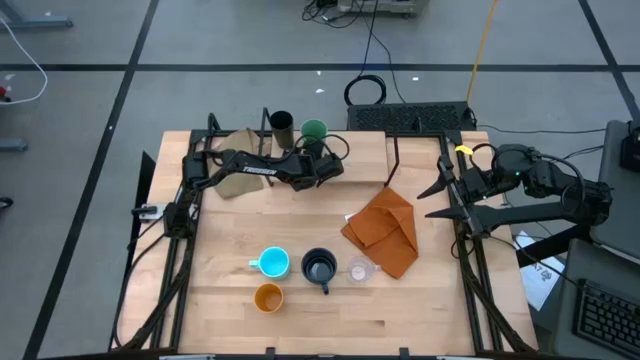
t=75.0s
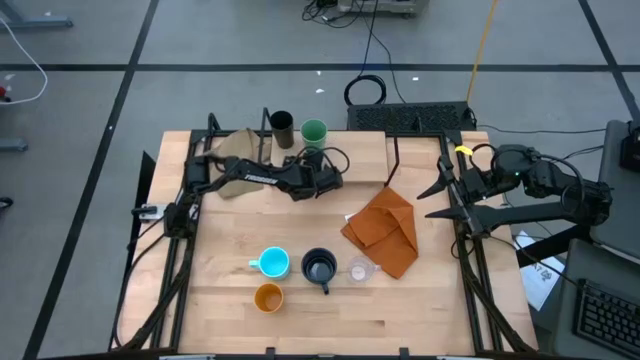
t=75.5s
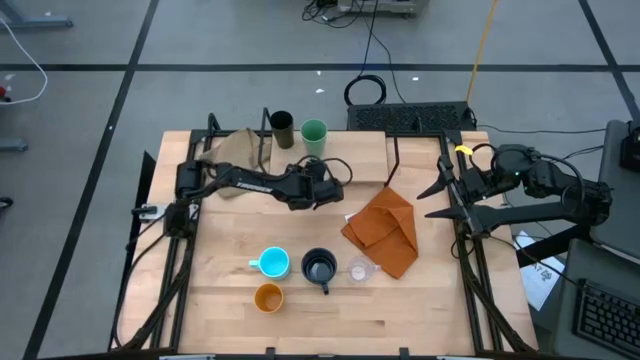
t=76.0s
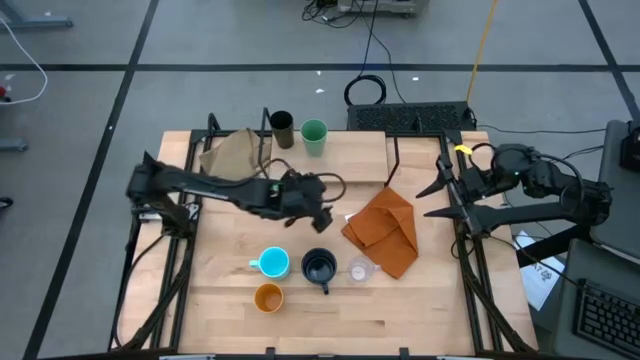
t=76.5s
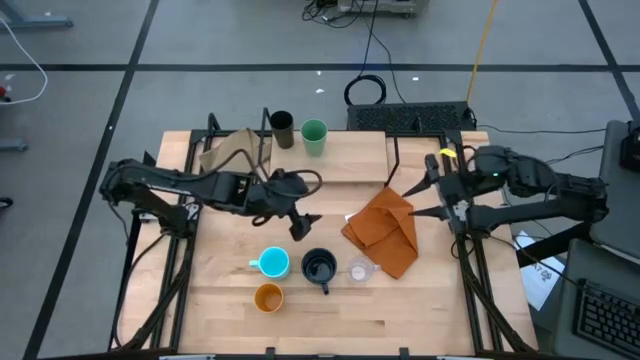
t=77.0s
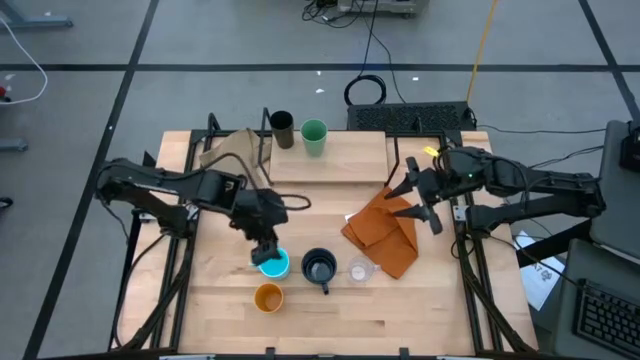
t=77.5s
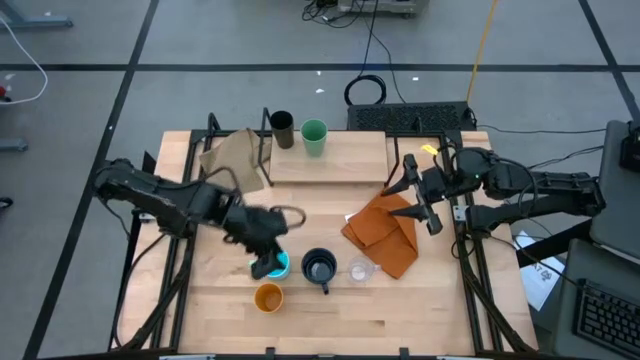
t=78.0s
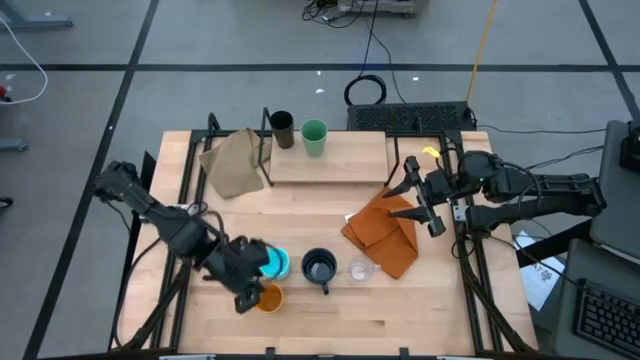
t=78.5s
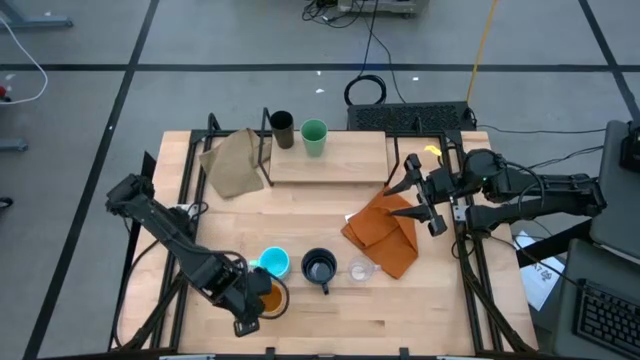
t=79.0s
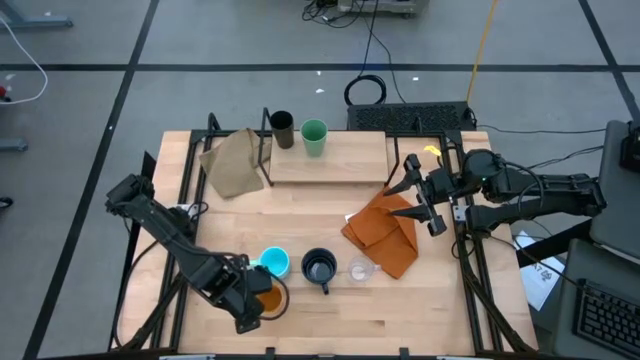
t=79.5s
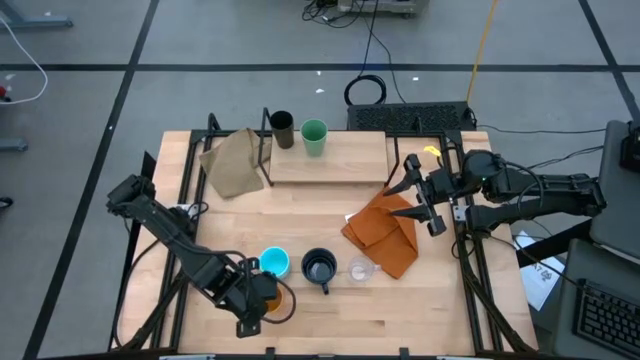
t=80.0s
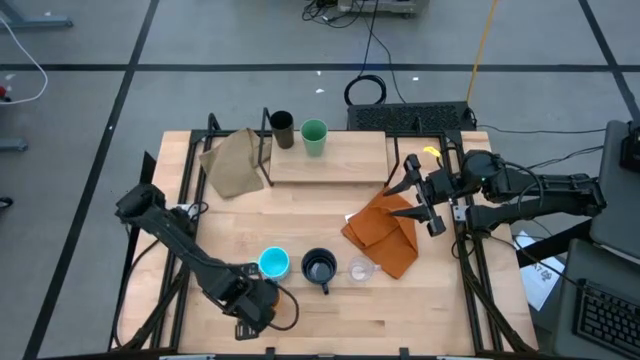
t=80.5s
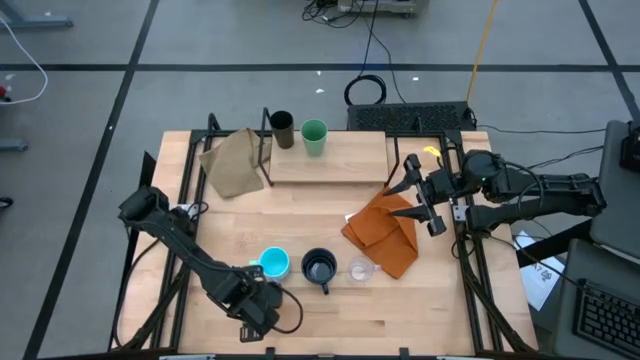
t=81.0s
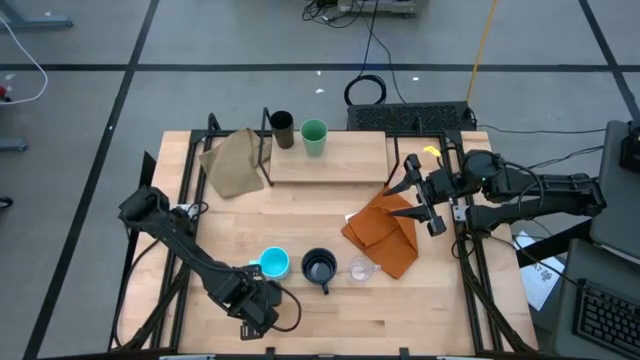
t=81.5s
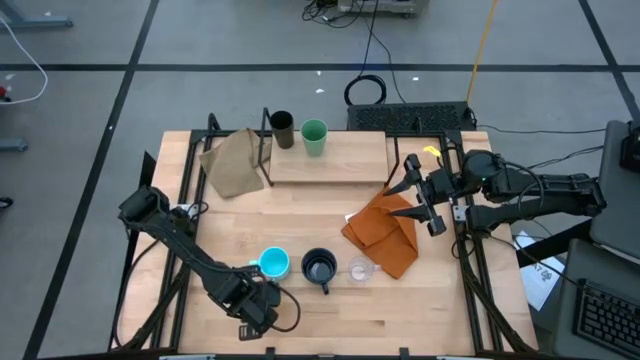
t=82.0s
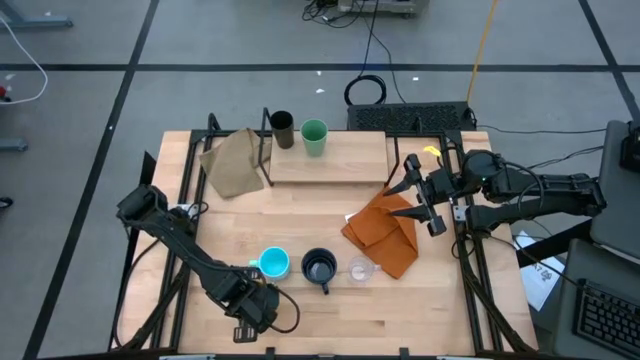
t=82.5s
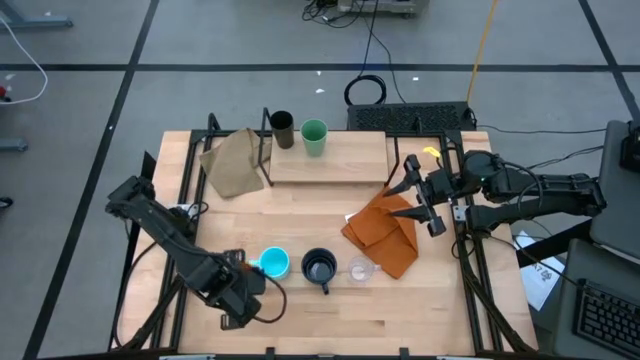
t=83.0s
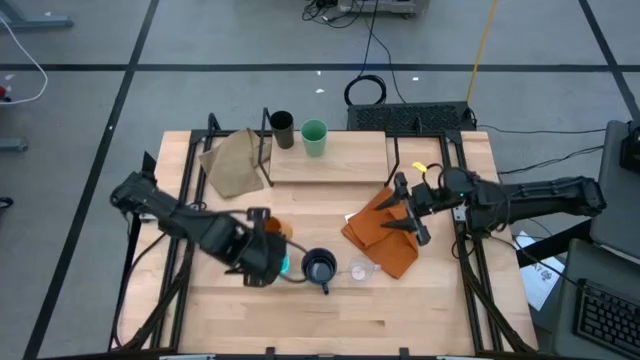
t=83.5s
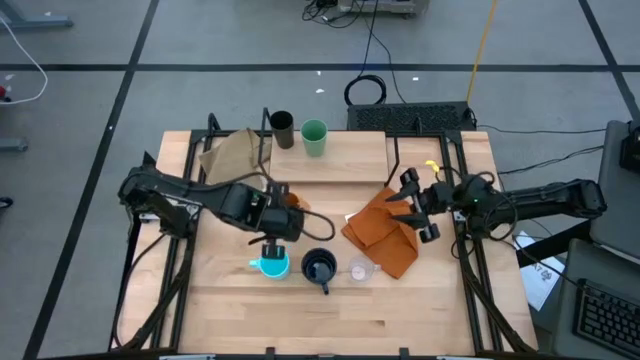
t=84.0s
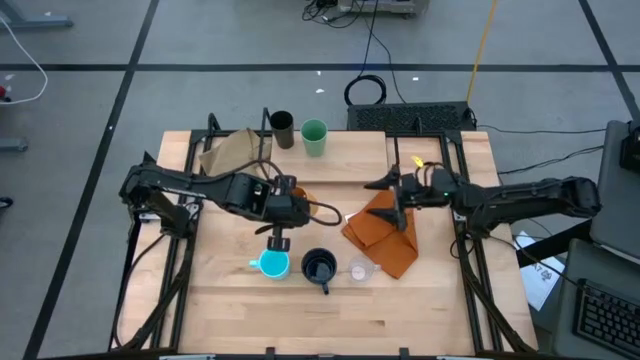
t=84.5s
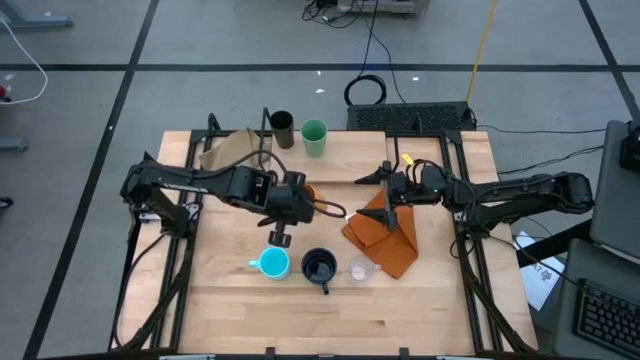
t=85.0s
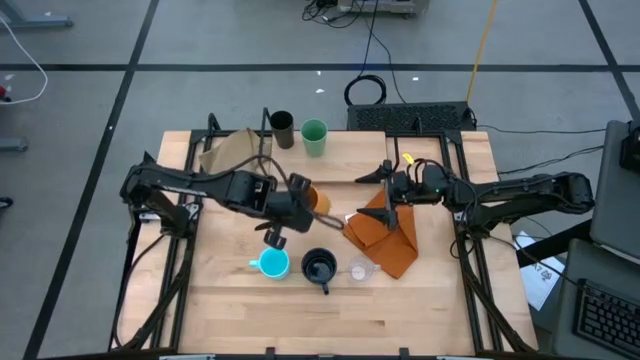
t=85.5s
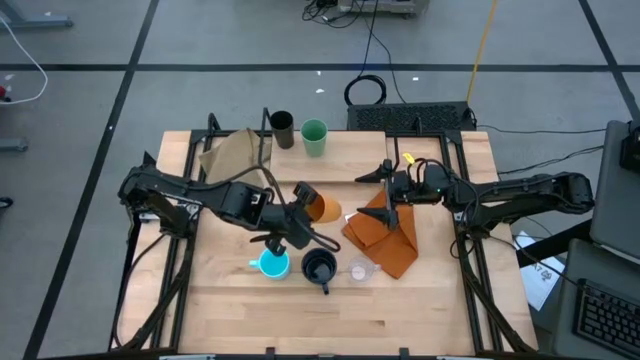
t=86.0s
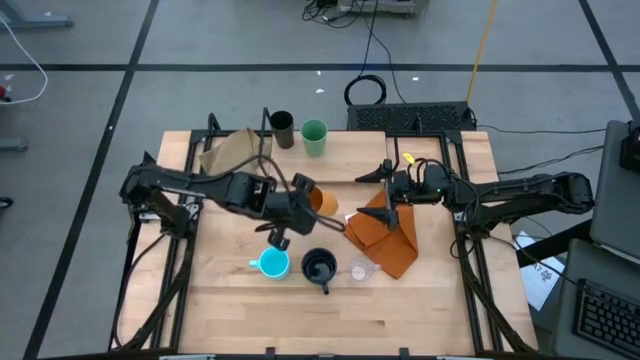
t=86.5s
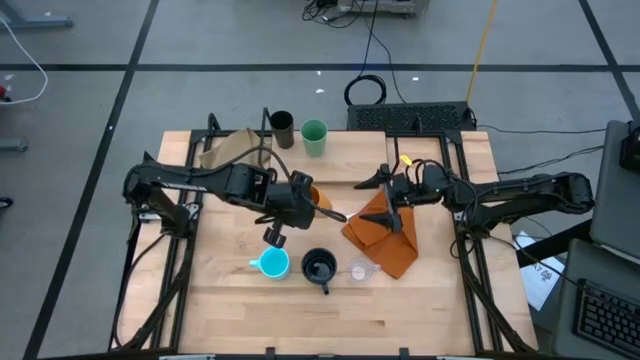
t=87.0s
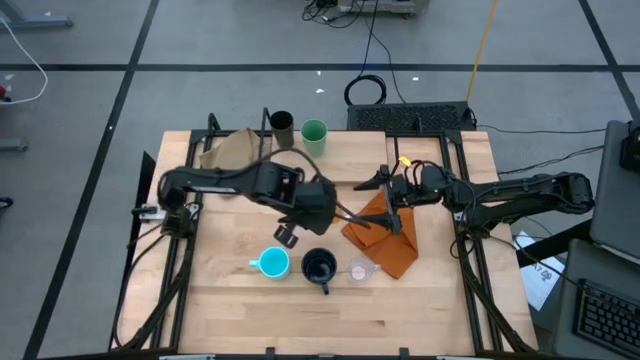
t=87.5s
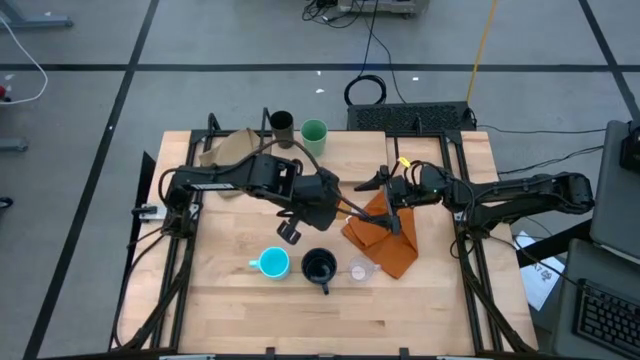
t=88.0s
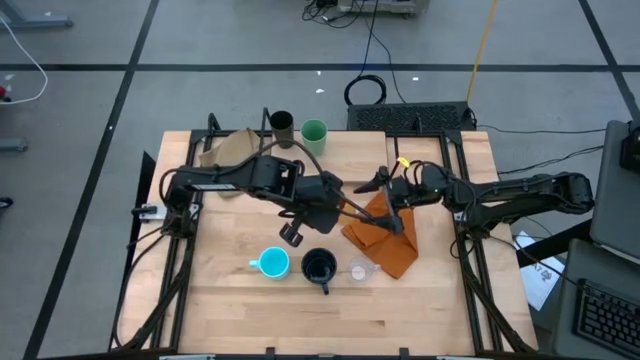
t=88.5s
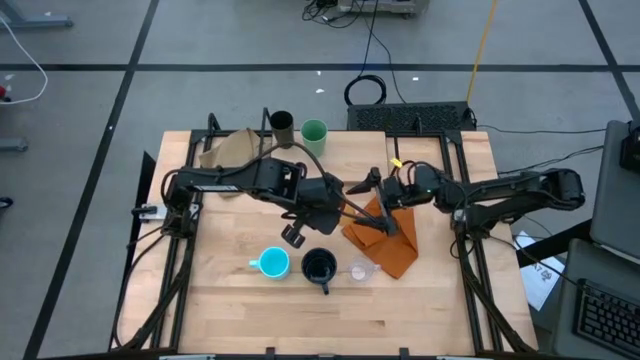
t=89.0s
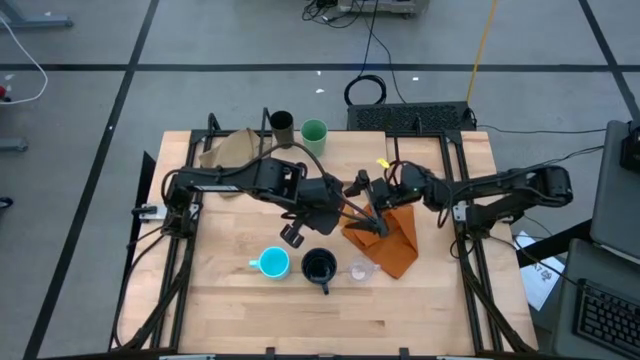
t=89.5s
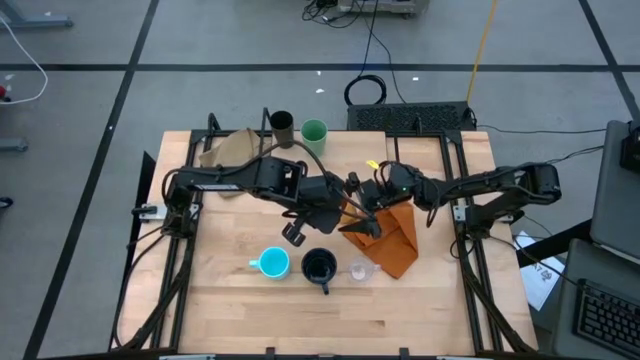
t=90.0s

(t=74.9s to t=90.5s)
Task: Stack small to large cups/mugs on shelf
Put the orange cup on the shelf

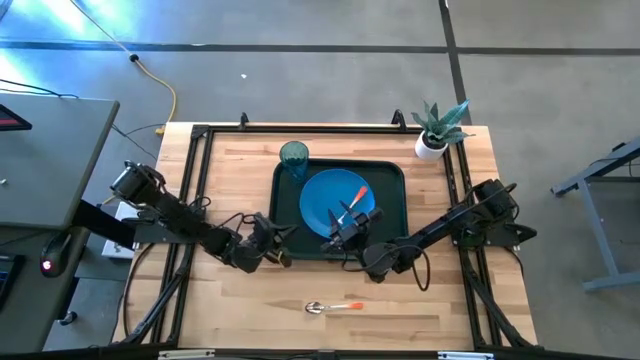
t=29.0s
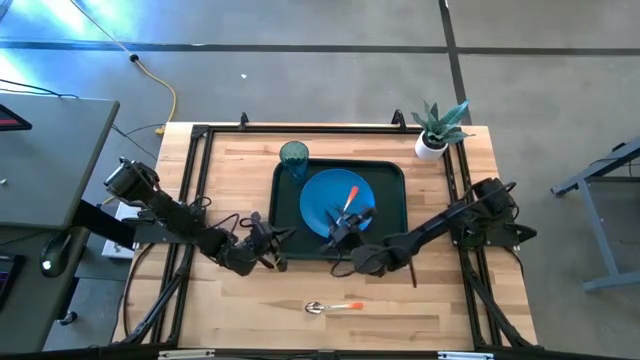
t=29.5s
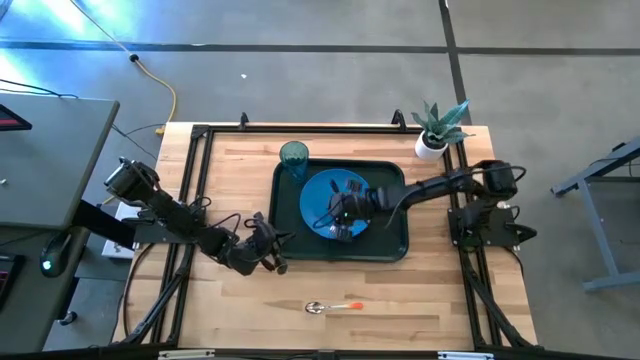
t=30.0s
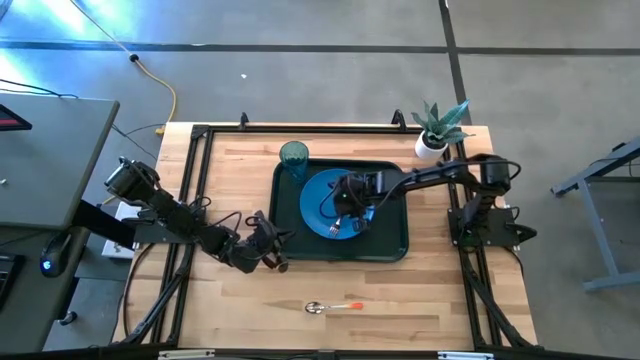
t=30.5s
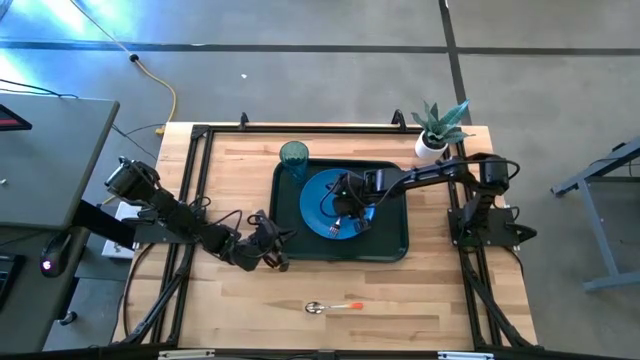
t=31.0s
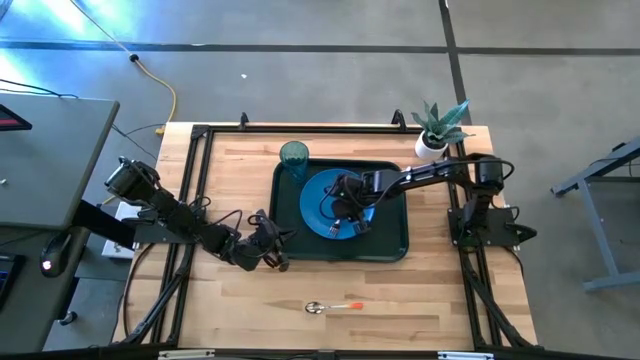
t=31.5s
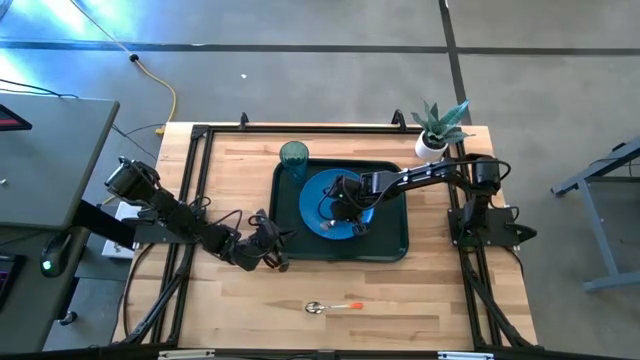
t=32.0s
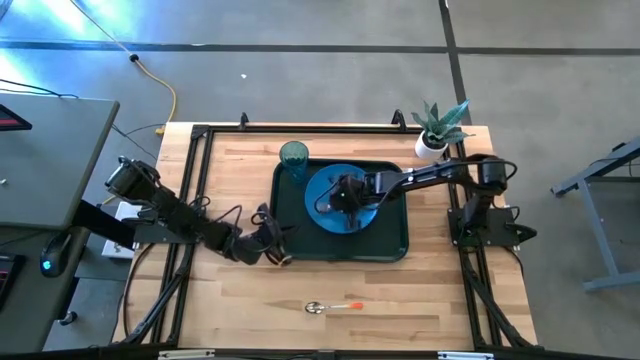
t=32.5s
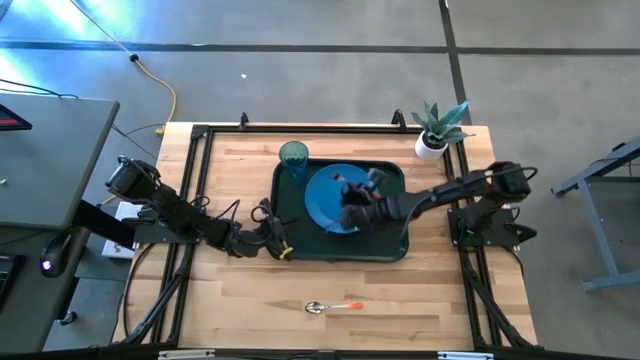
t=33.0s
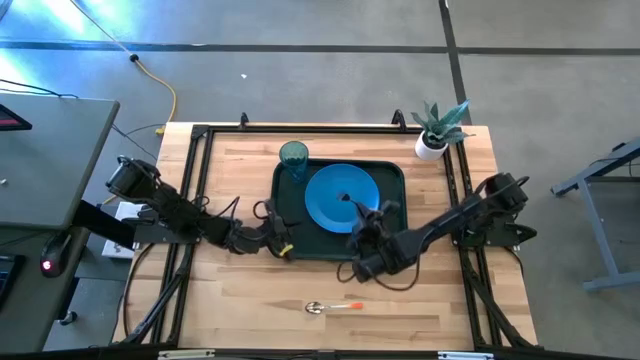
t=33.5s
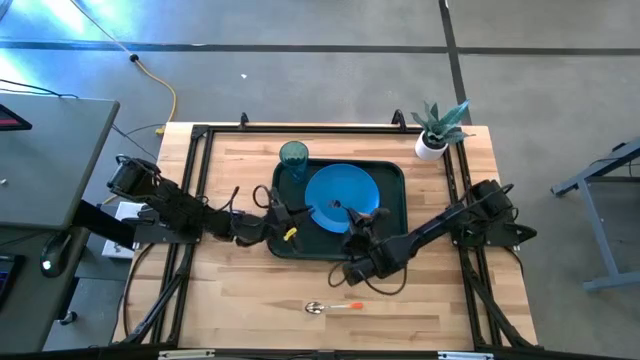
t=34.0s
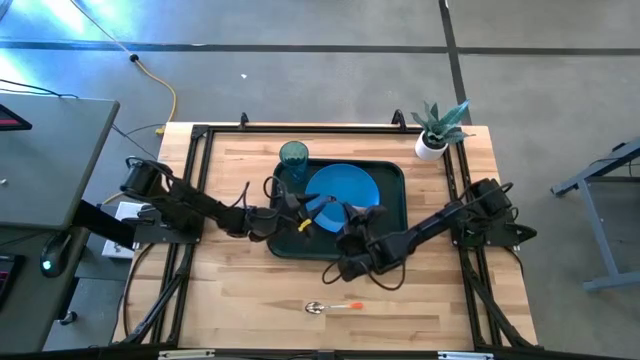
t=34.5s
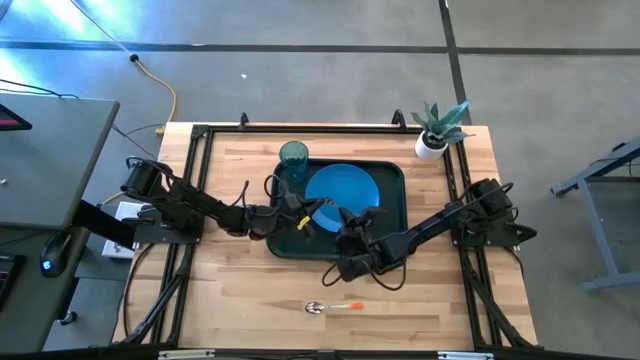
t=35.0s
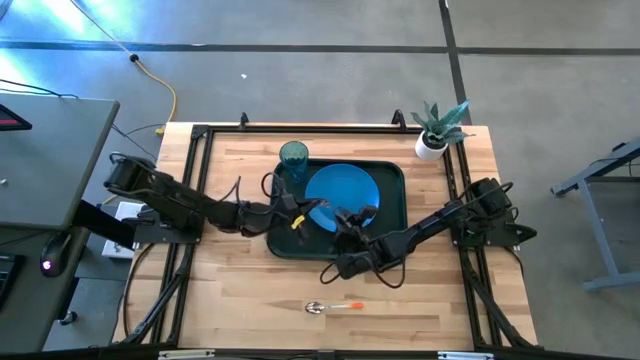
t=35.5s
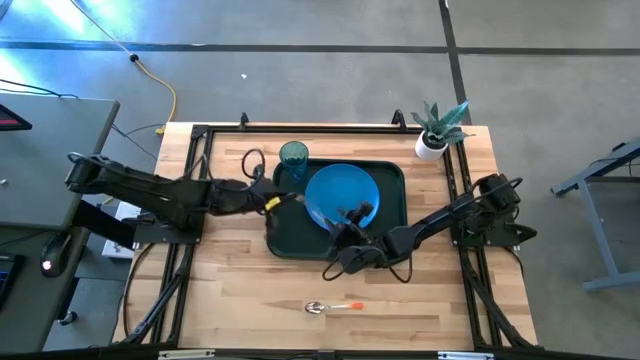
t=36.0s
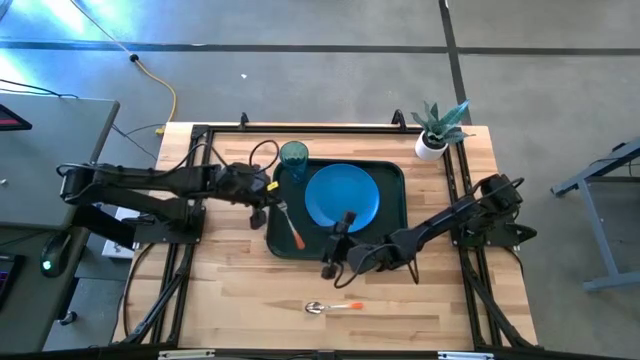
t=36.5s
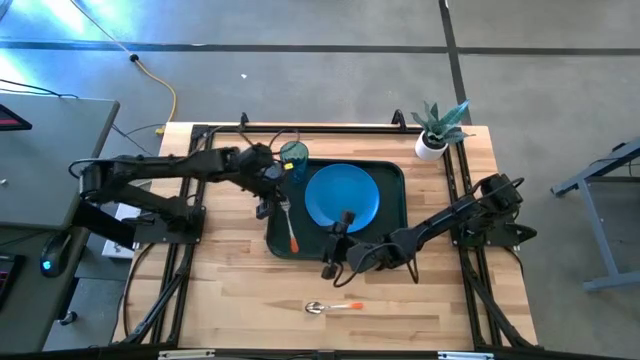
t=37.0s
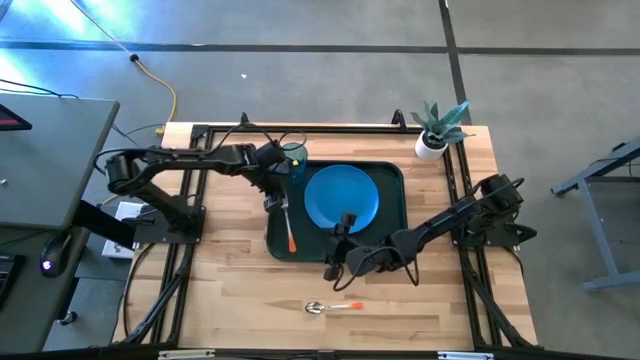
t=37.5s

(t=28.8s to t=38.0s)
Task: Pick and place plate/cup/fork/spoon on tray
Put the orange fork on the dark green tray to the left of the blue plate
